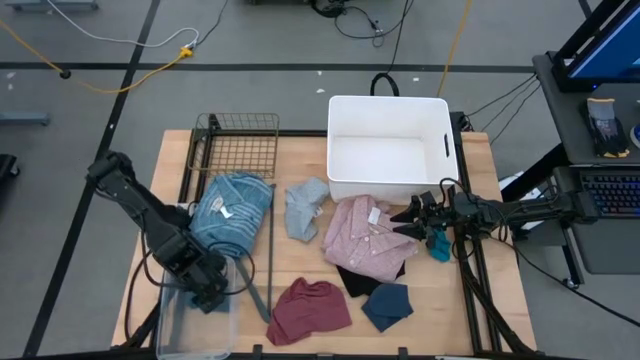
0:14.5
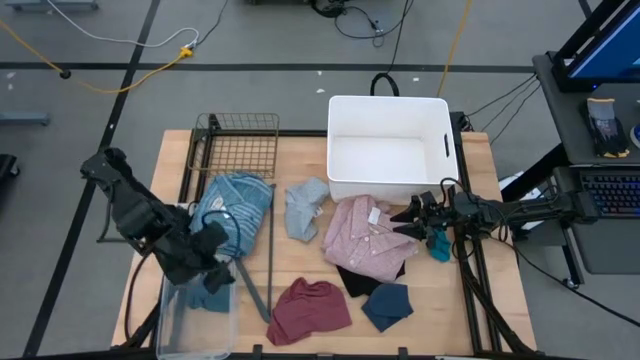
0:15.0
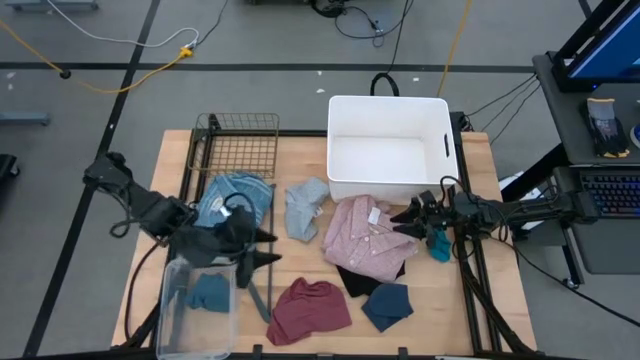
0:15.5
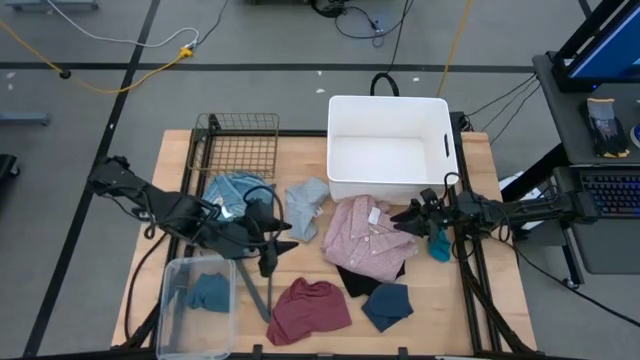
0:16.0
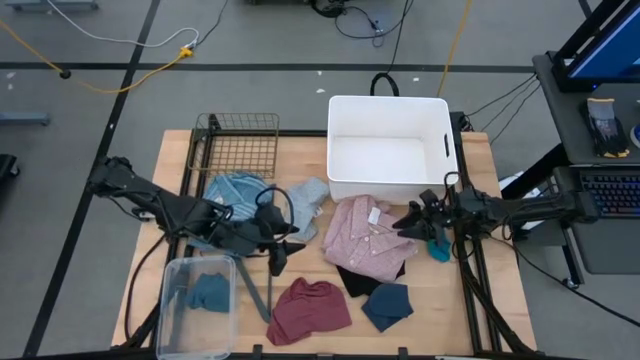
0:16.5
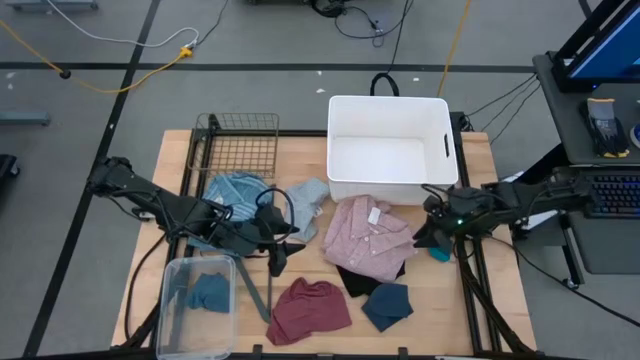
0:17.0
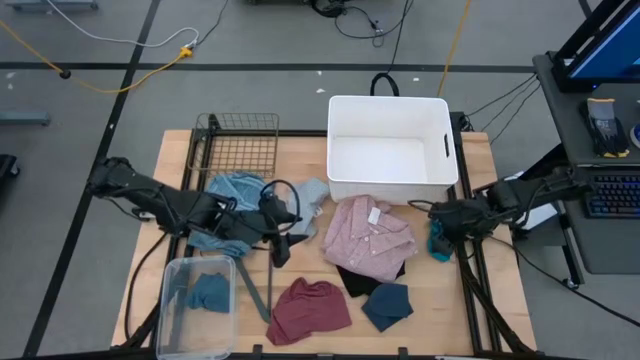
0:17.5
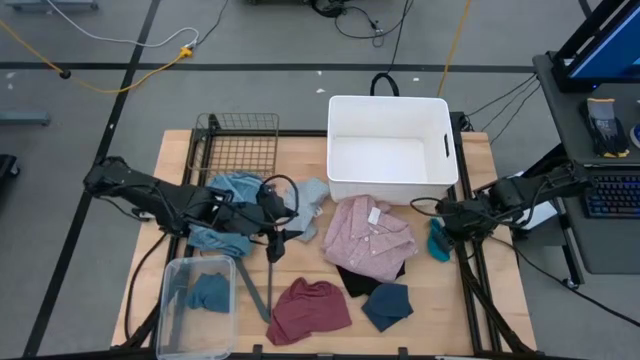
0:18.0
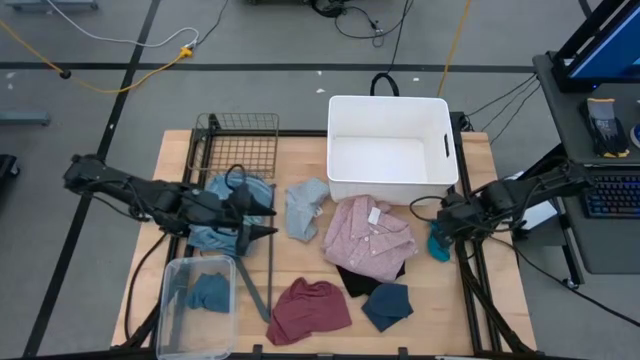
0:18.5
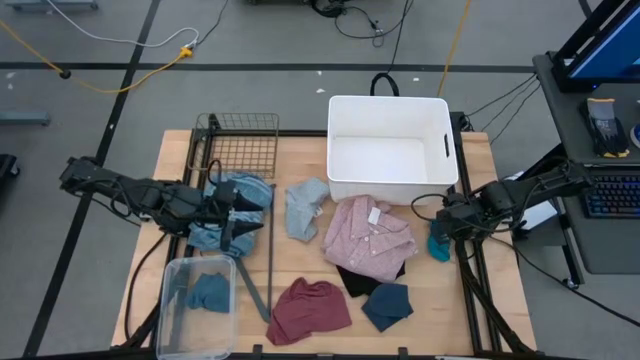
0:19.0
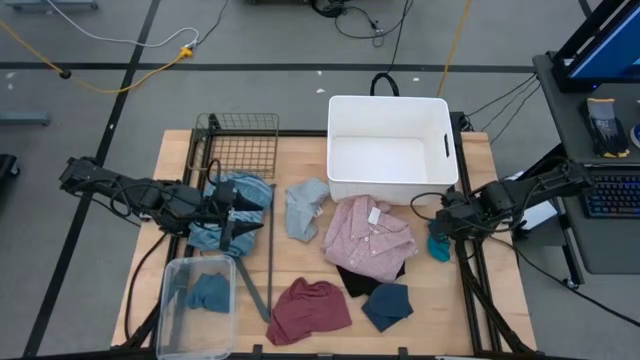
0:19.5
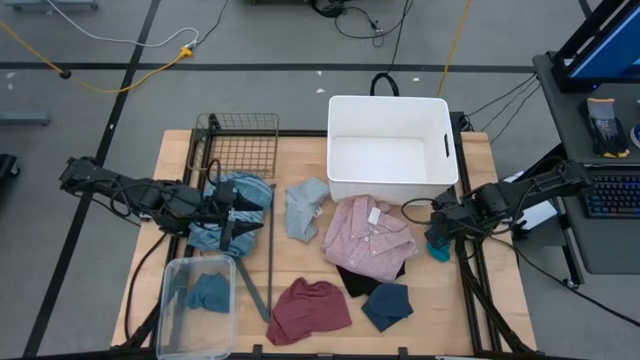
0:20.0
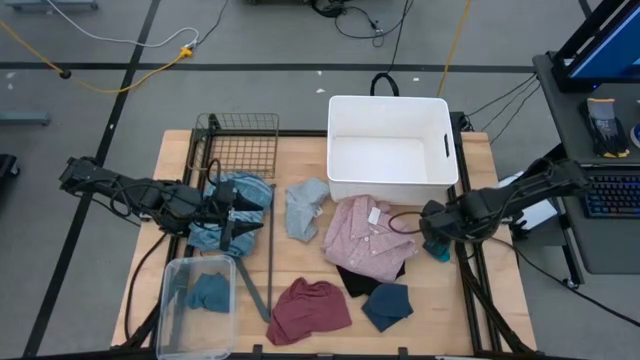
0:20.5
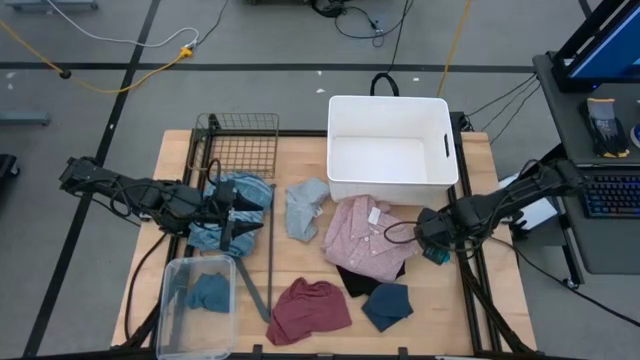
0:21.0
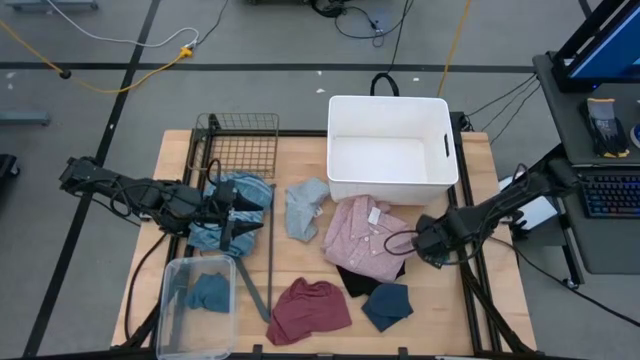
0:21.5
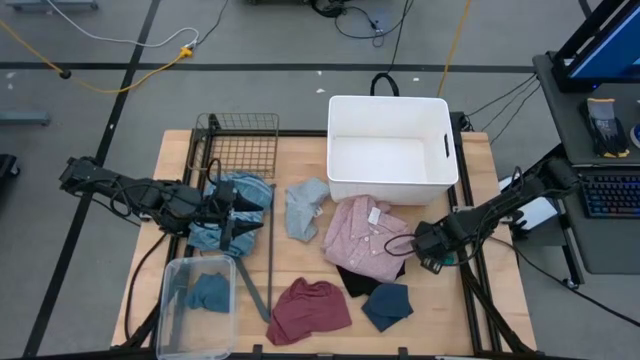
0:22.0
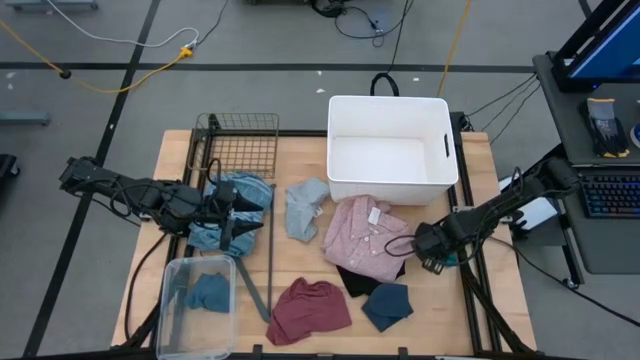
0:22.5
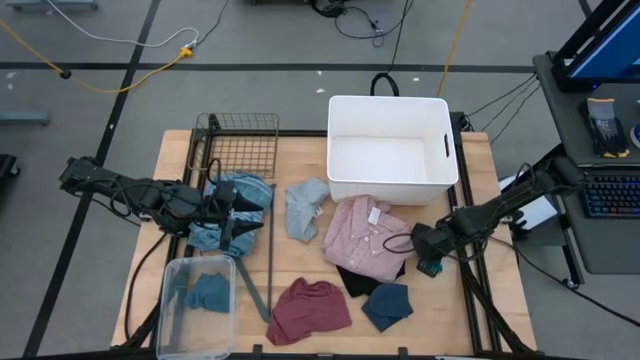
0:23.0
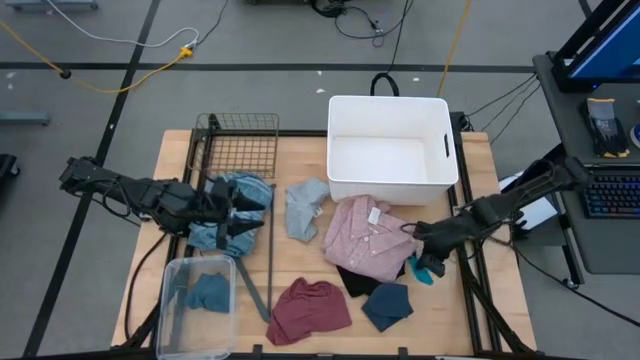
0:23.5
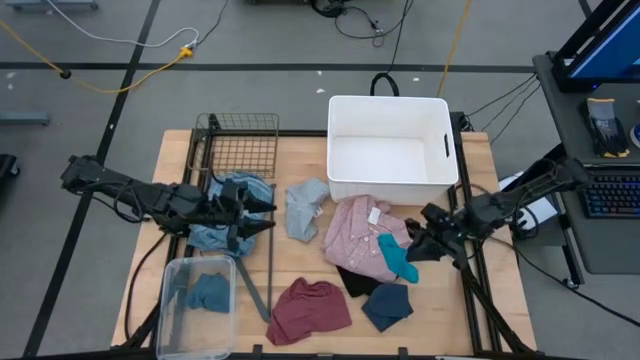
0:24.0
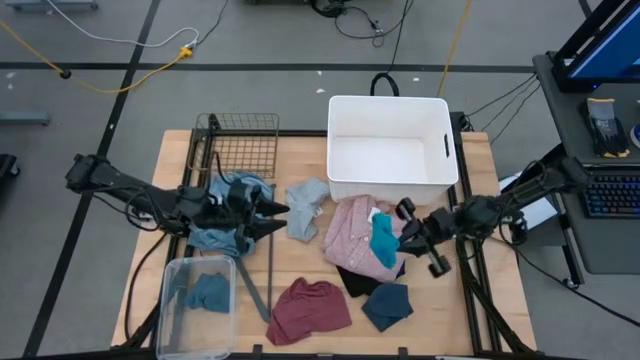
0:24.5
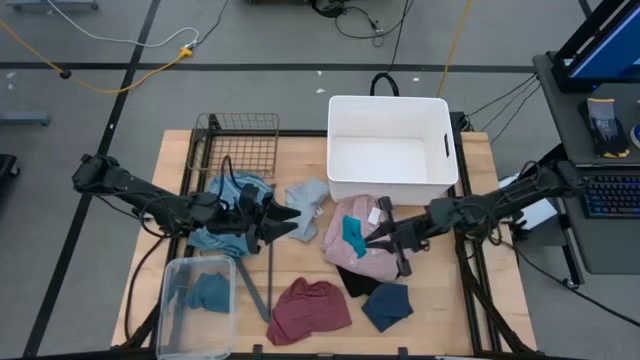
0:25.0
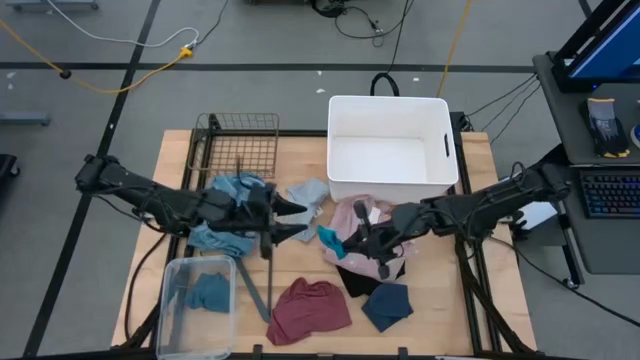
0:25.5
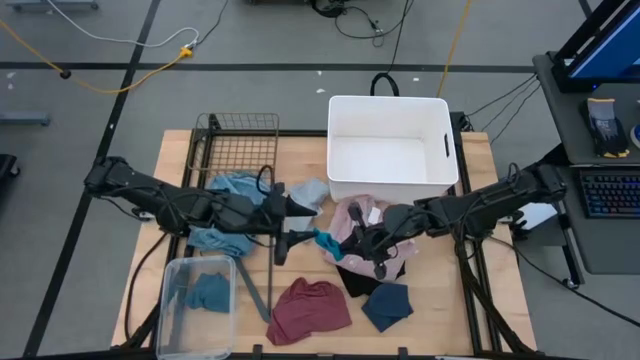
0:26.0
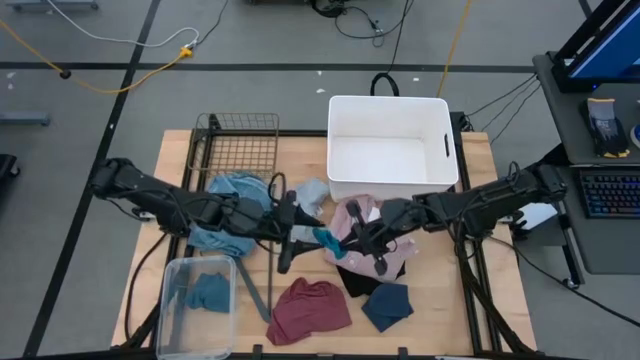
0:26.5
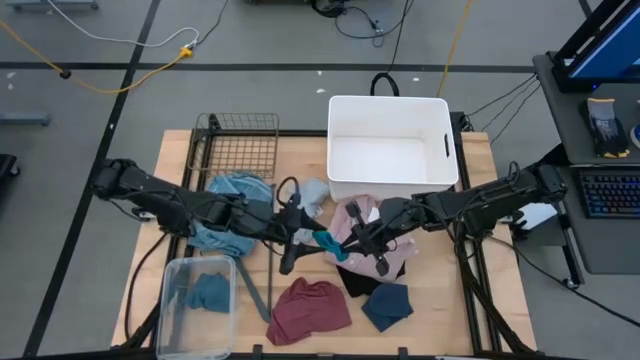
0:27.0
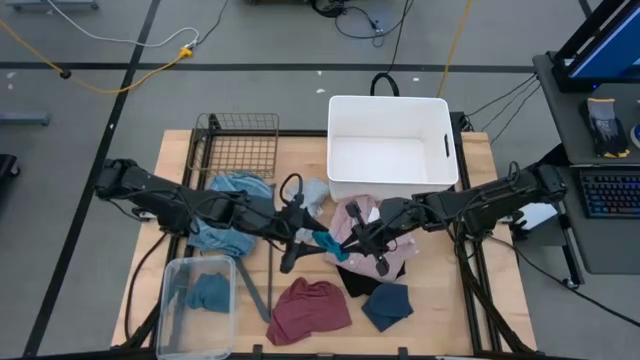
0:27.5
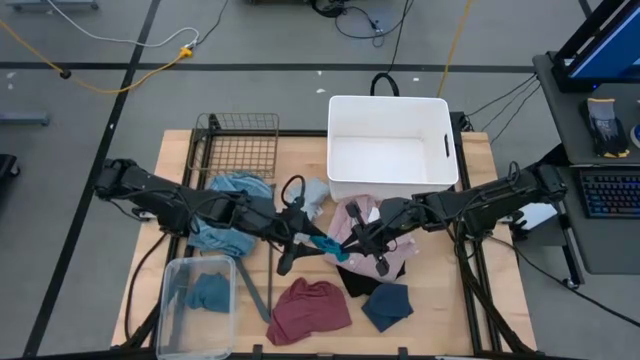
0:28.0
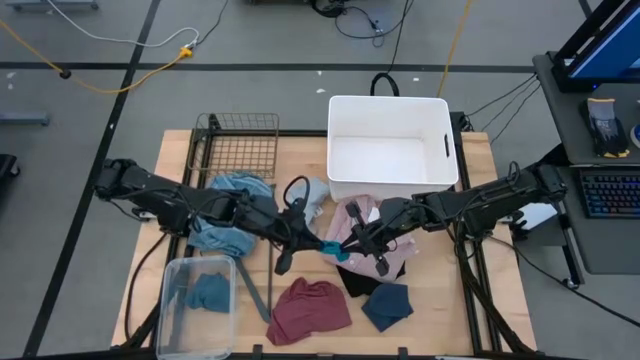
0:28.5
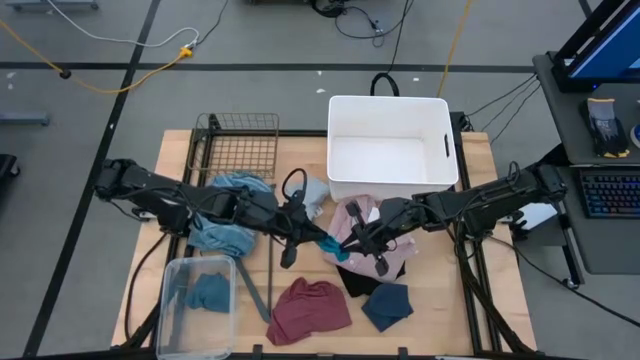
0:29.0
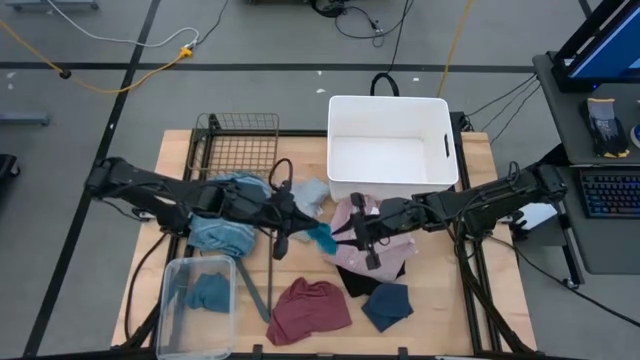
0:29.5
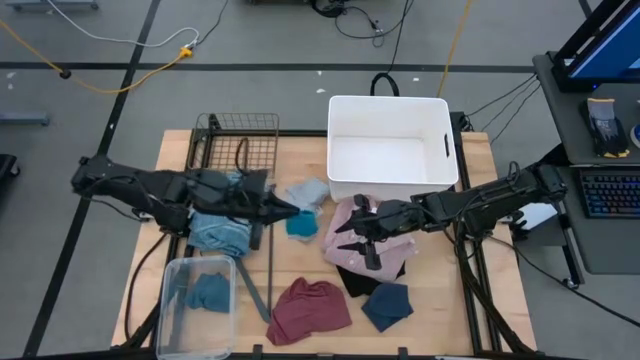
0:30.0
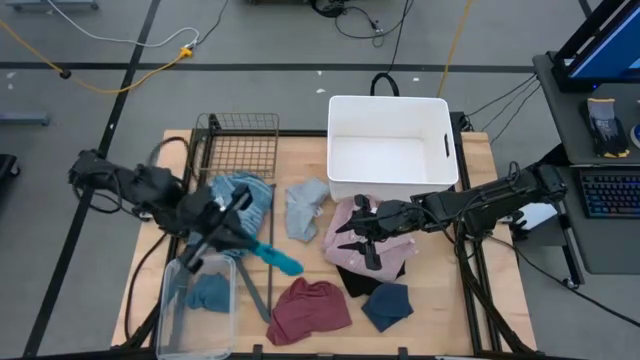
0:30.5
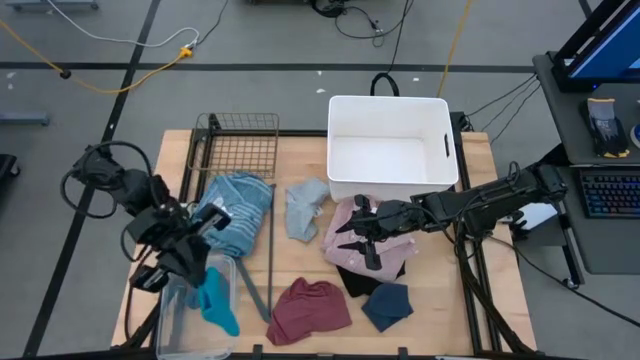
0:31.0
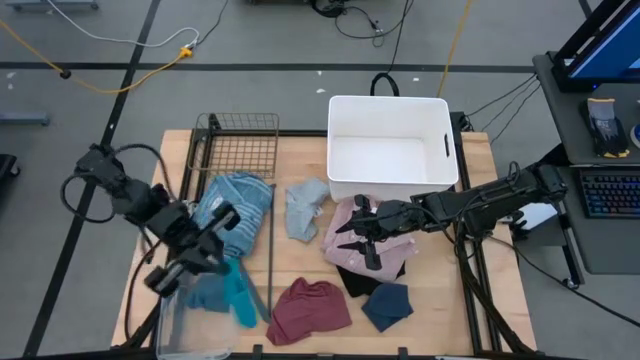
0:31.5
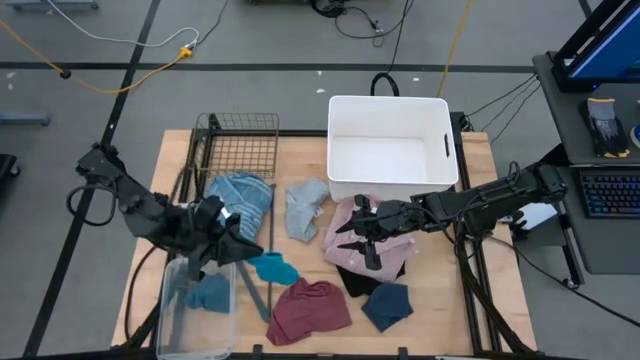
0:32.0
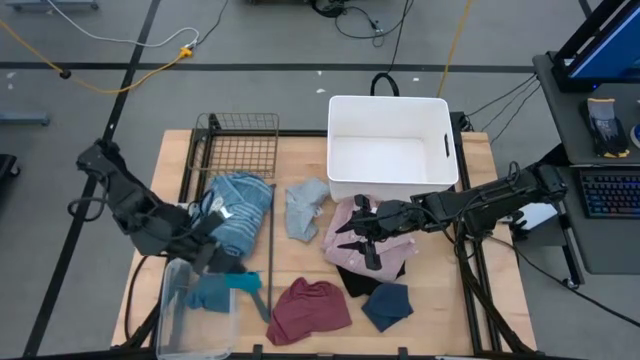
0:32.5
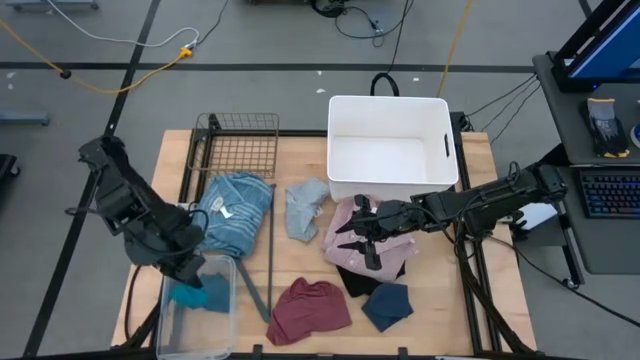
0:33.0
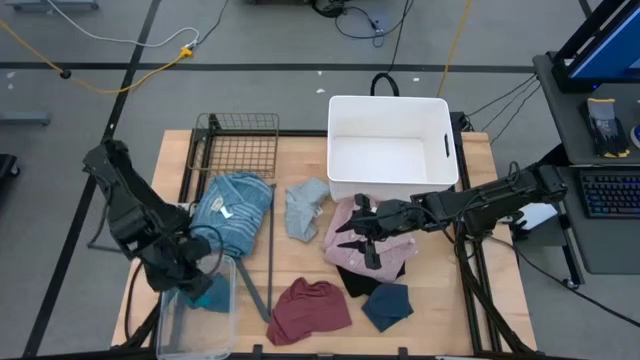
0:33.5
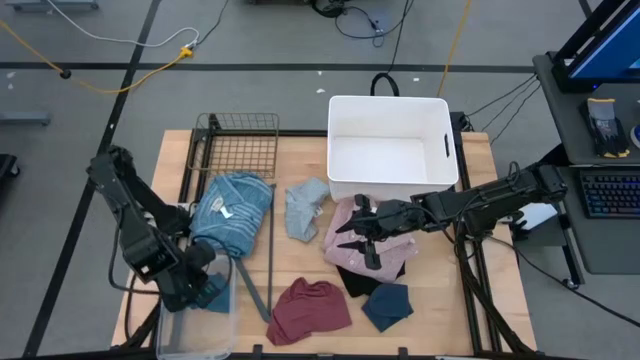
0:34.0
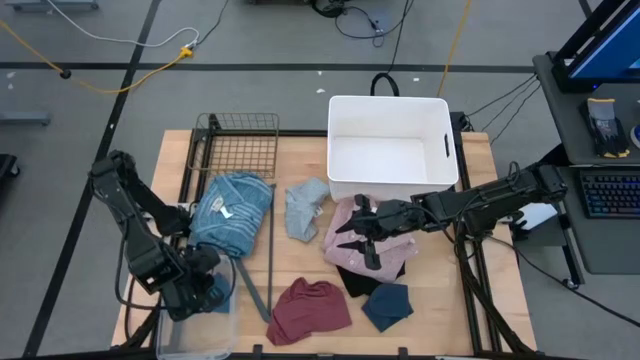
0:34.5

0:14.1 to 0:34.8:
Task: Pick & Place Cloths
Put the light blue sock into the transparent bin

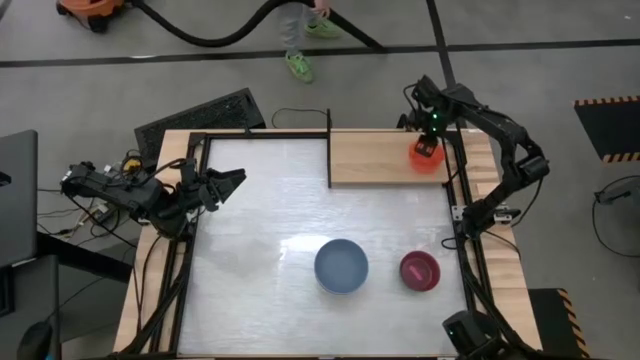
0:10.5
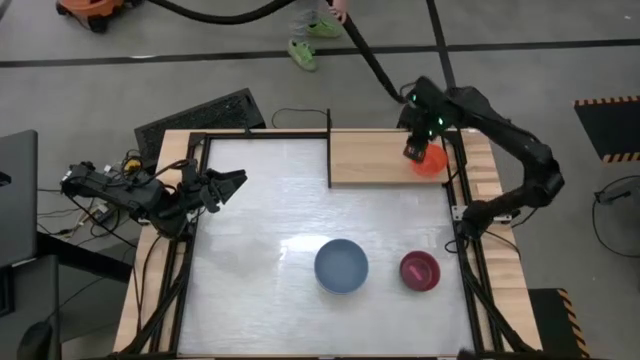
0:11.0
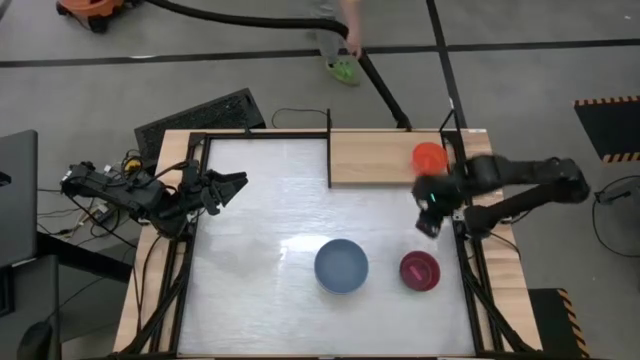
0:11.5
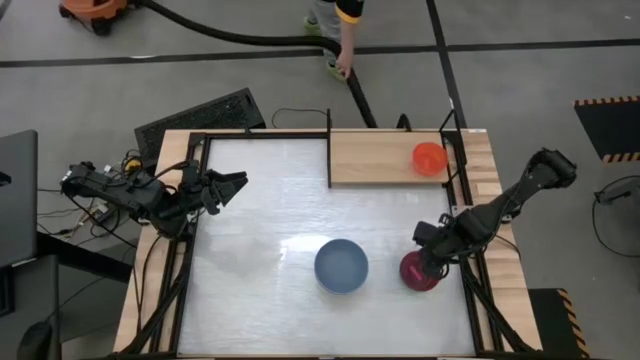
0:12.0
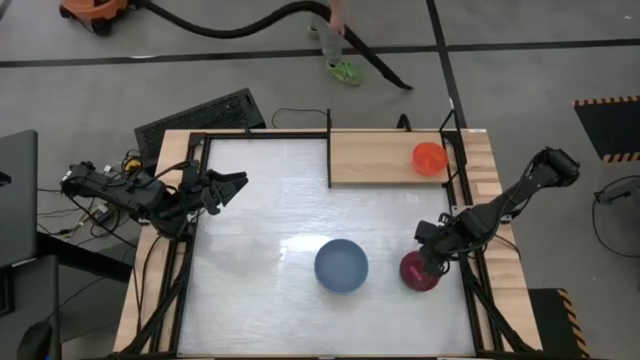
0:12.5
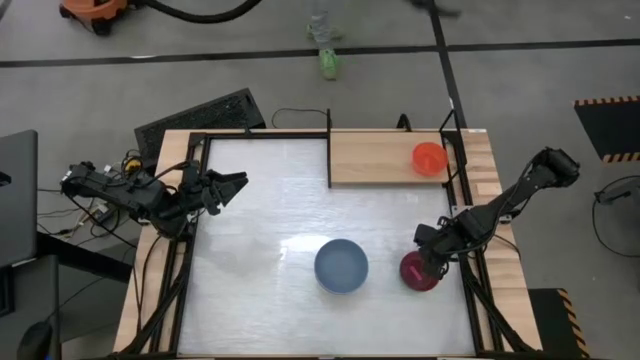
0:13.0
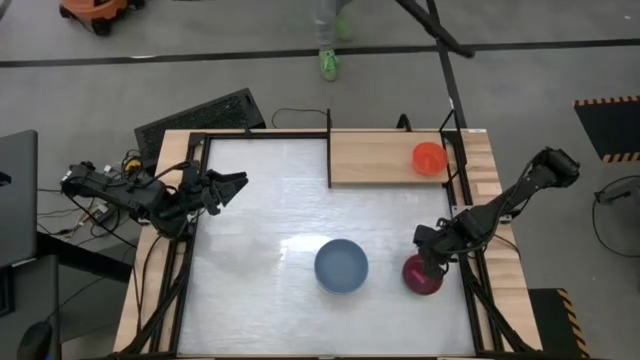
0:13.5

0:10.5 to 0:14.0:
Task: Place and stack bowls onto a shelf
Stack the pink transparent bowl on top of the orange transparent bowl on the shelf
